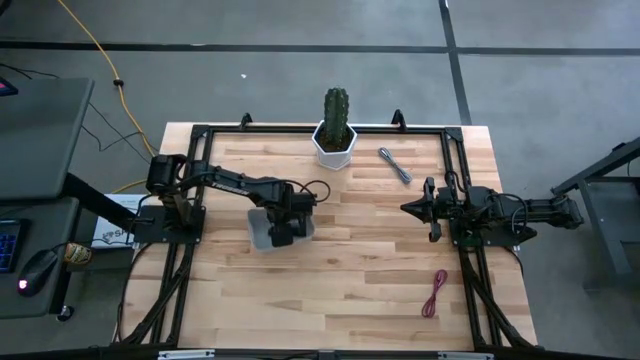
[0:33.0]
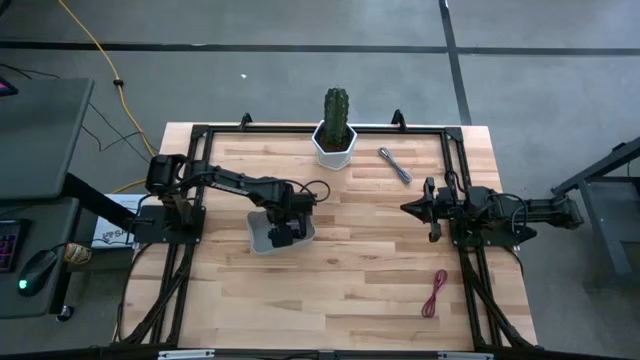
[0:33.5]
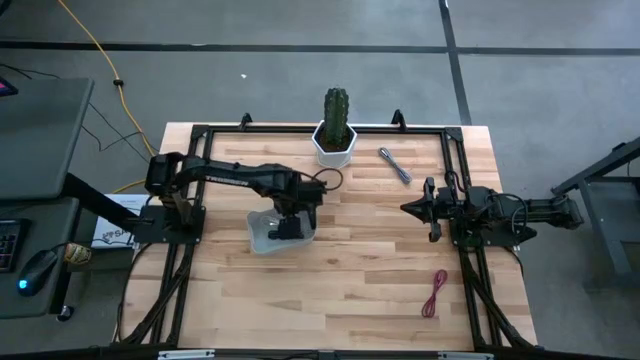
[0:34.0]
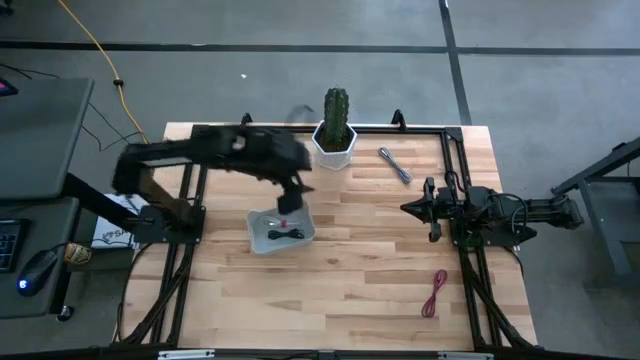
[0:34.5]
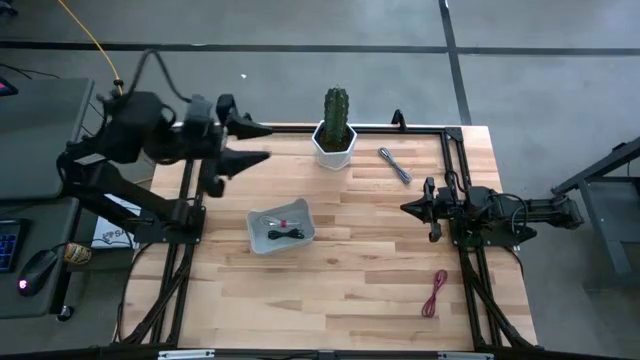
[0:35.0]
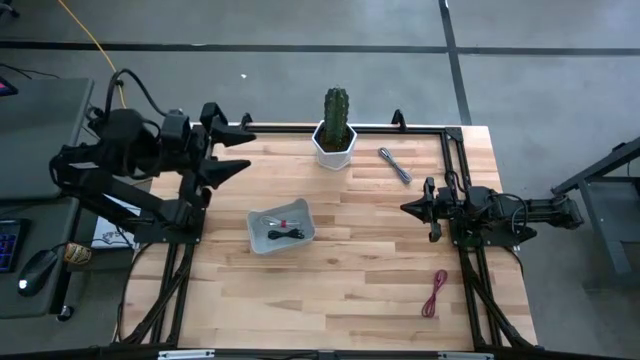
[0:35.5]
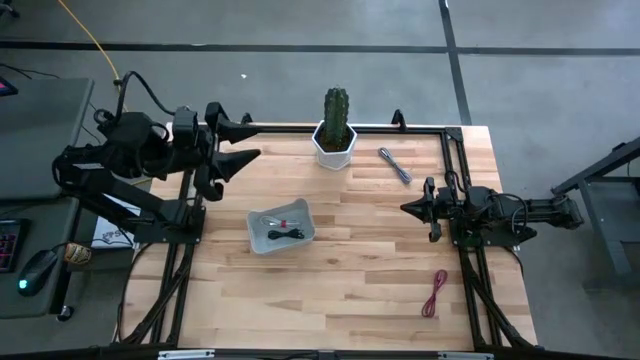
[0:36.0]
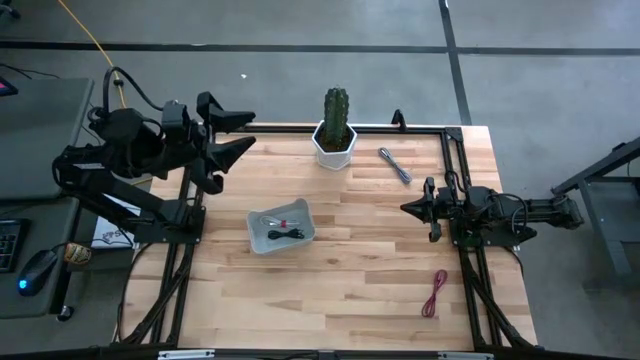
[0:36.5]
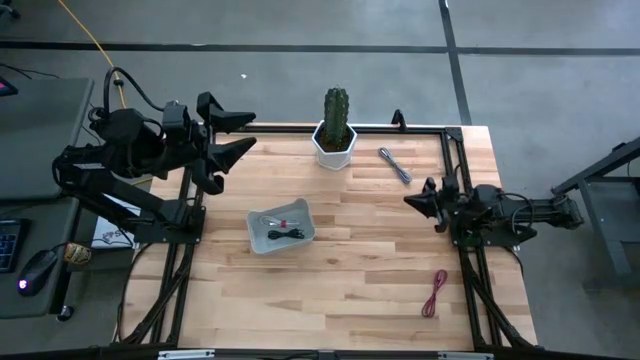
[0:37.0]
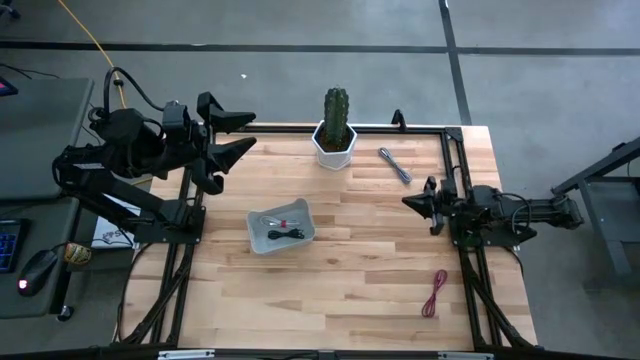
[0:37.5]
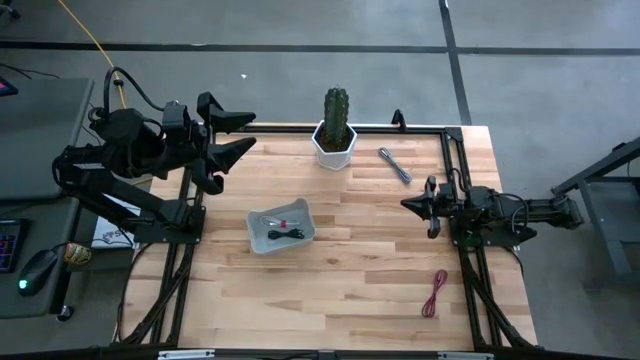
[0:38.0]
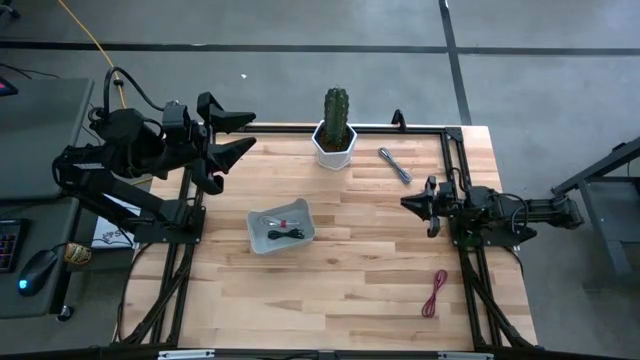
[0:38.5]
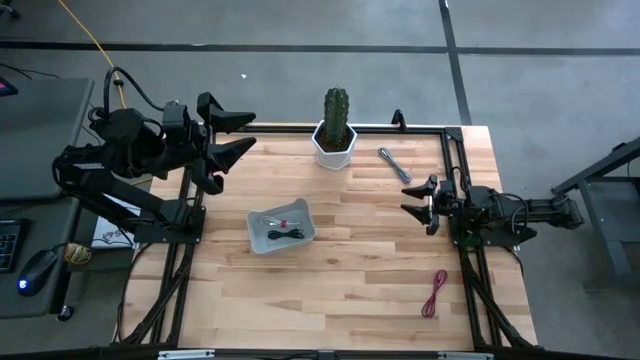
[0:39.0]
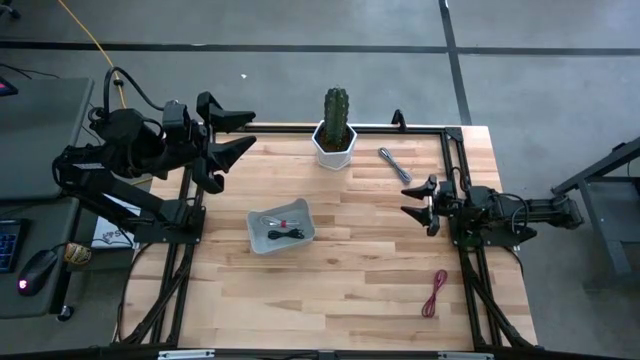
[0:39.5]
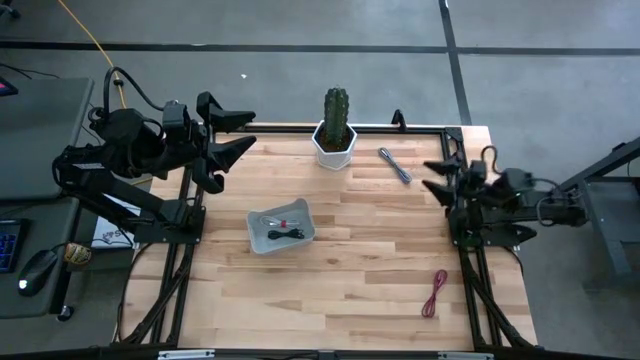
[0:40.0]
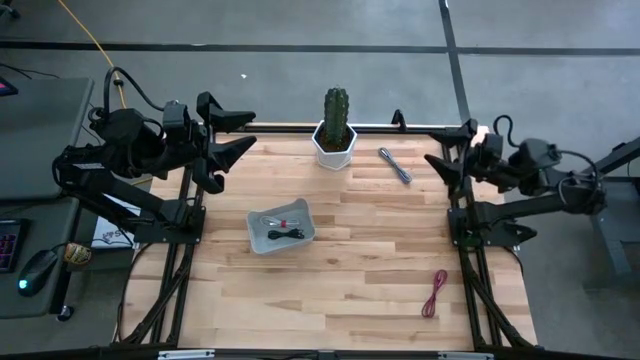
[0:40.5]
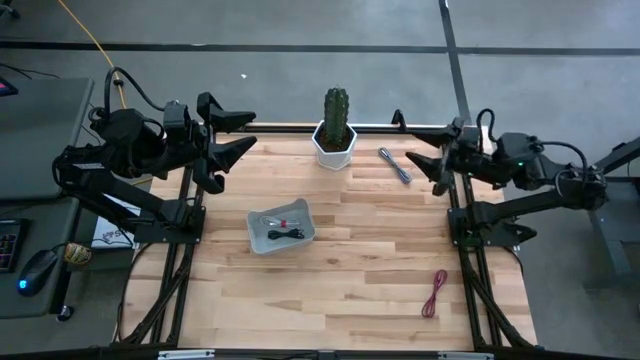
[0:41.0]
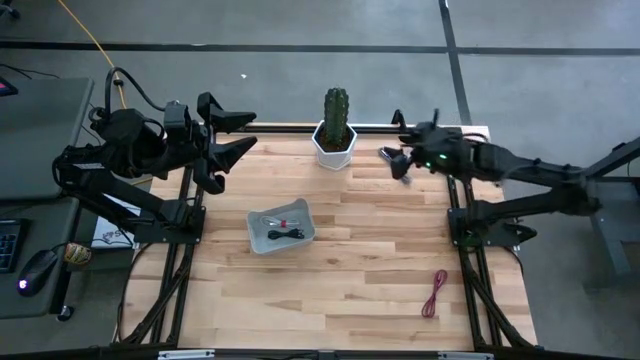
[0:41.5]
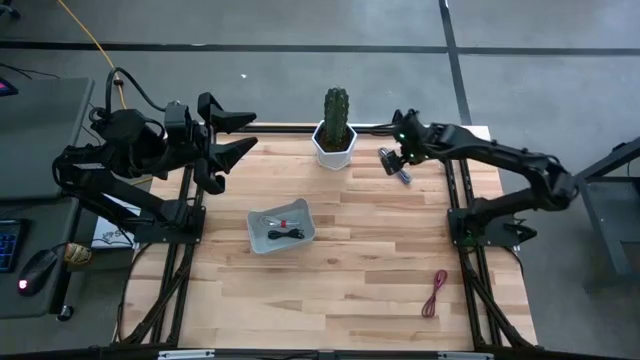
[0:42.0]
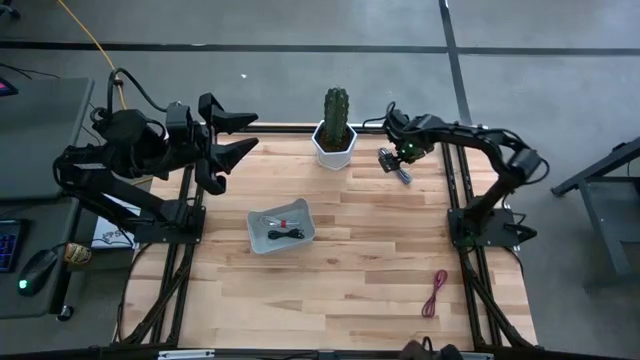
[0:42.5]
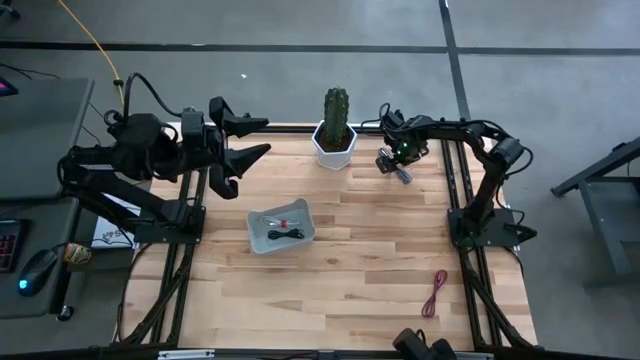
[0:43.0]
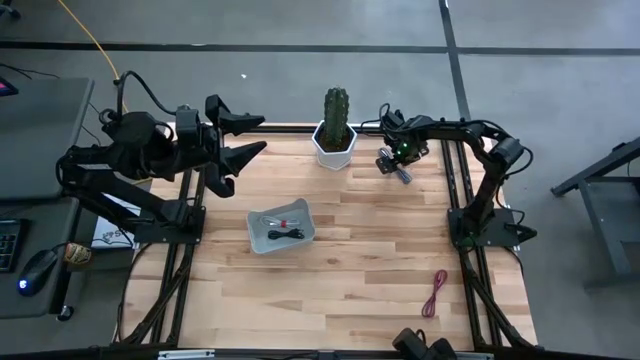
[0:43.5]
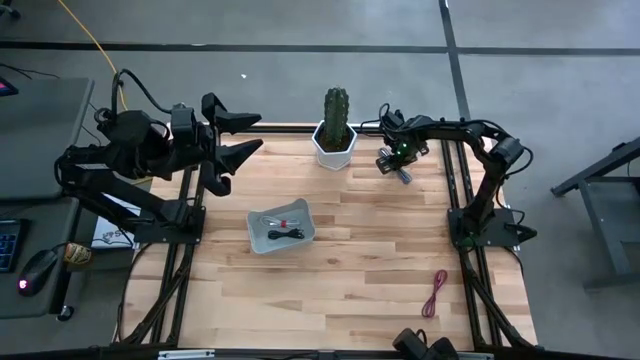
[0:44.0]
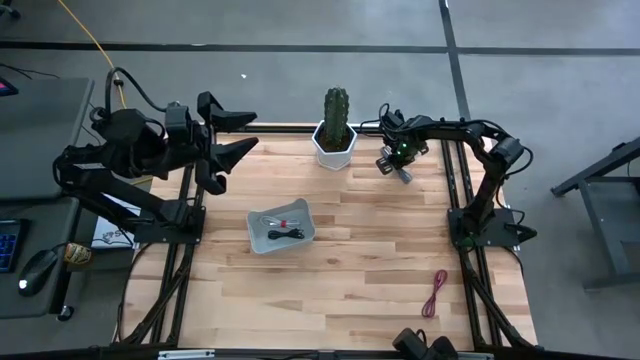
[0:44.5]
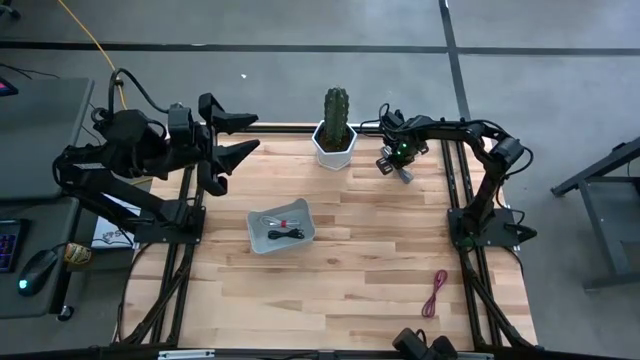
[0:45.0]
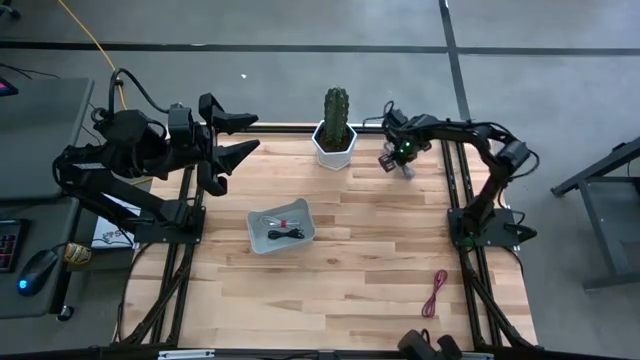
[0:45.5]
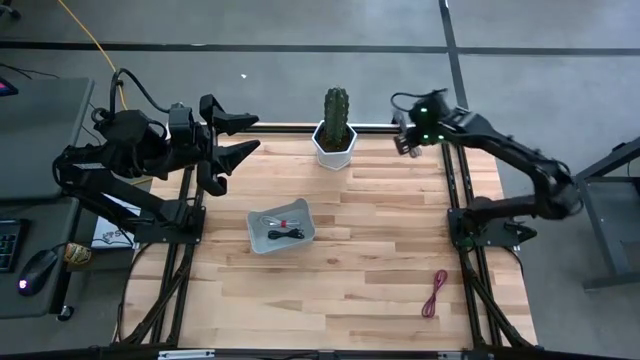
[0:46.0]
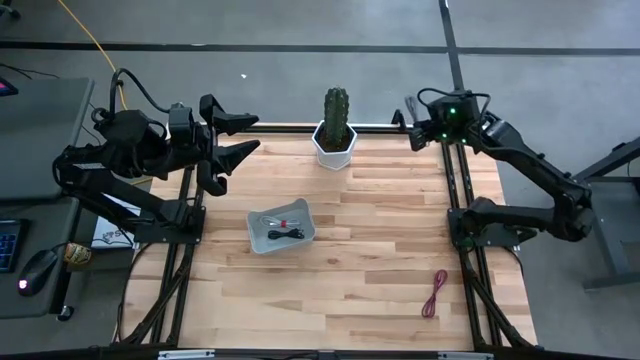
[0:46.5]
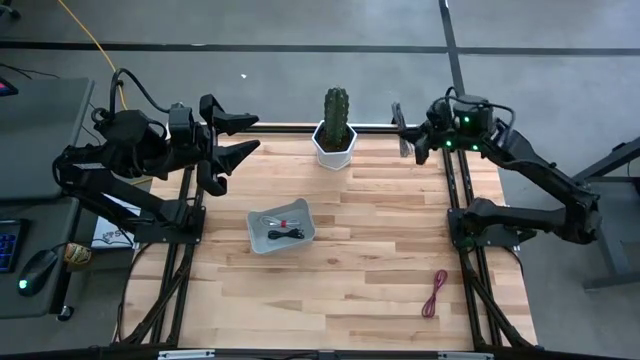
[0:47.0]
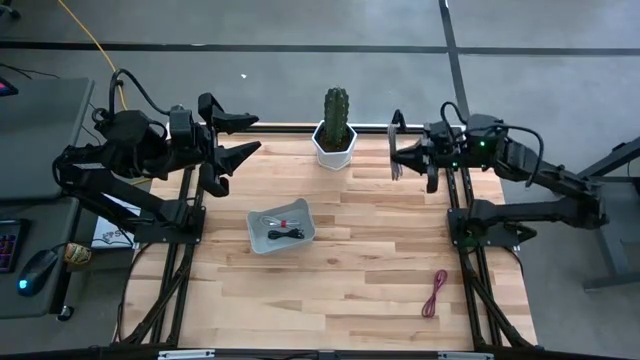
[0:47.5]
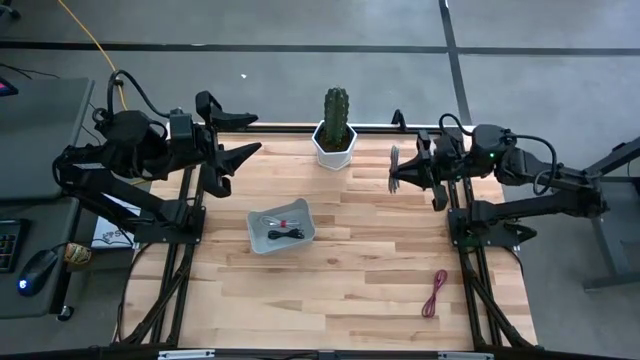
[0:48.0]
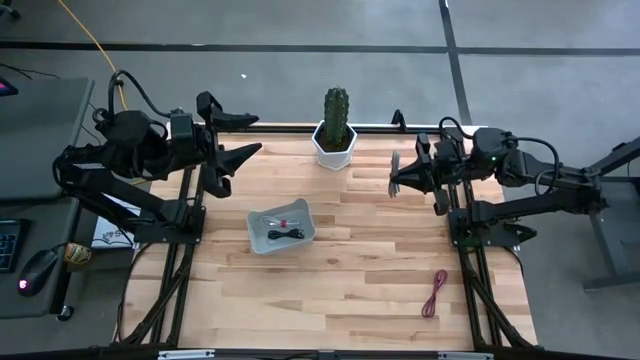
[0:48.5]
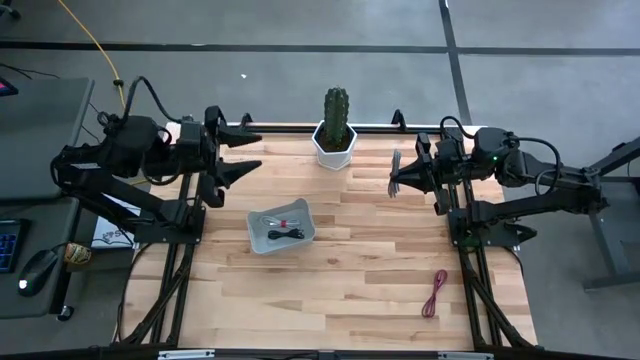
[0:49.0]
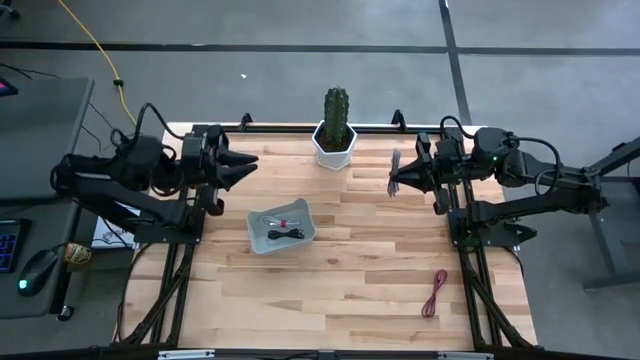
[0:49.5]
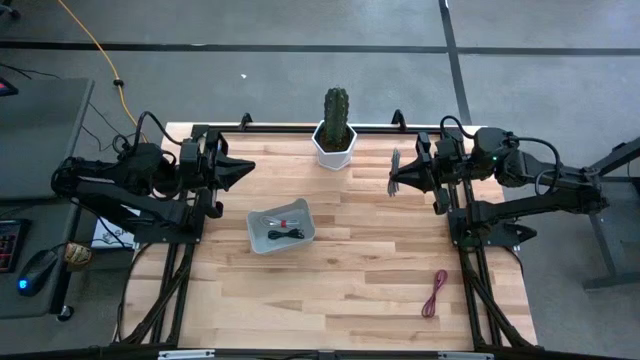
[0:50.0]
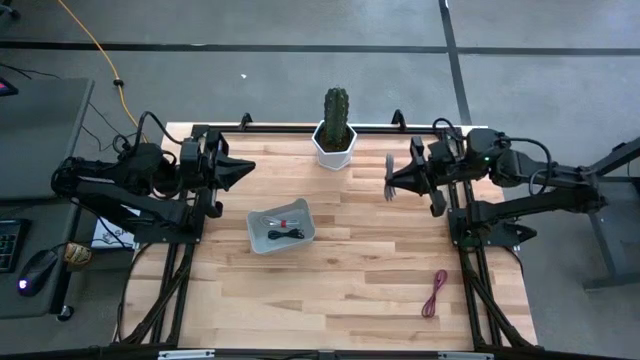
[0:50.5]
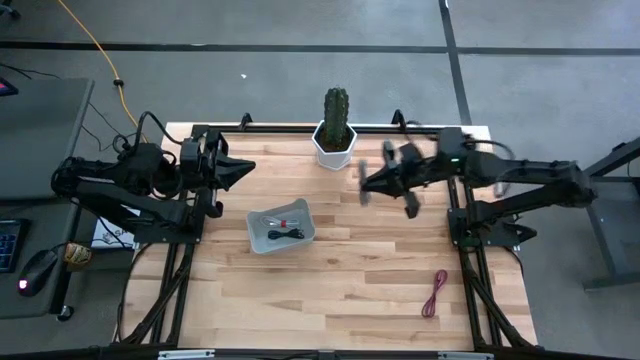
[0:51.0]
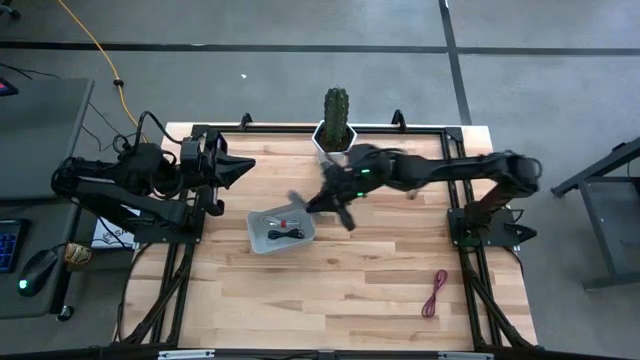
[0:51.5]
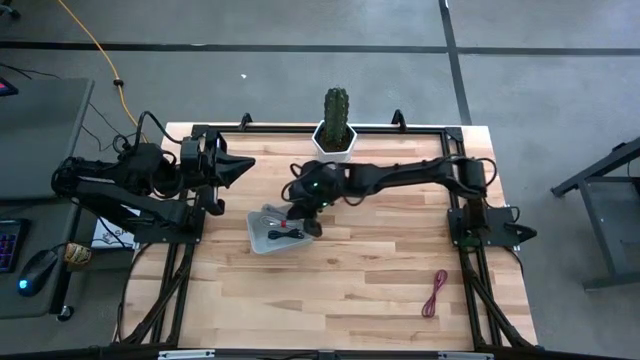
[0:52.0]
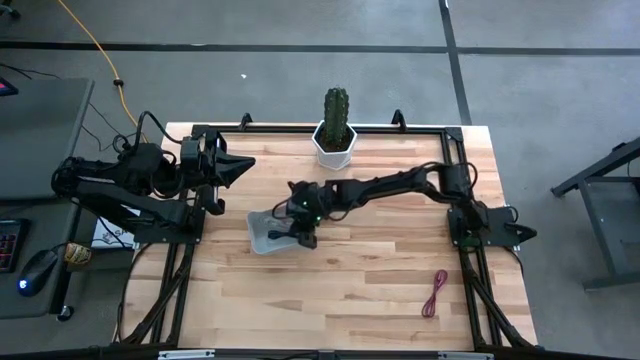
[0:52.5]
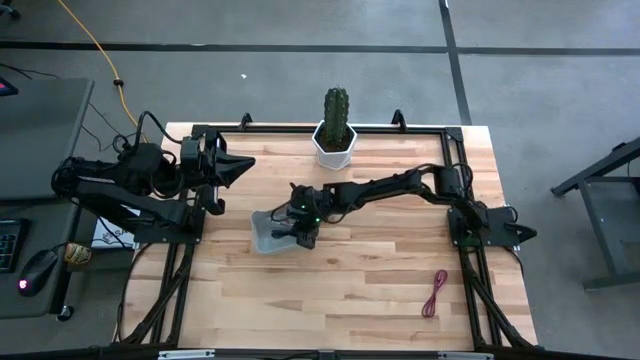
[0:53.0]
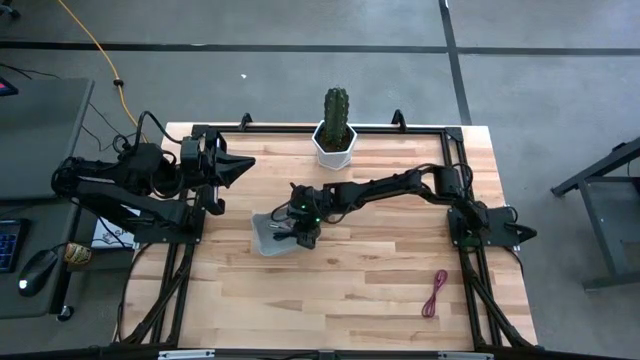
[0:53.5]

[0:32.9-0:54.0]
Task: Pick and place USB-C Cables
Put the black and white charger cable into the gray bin
